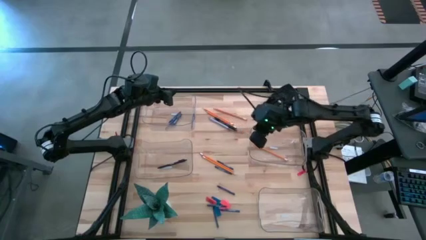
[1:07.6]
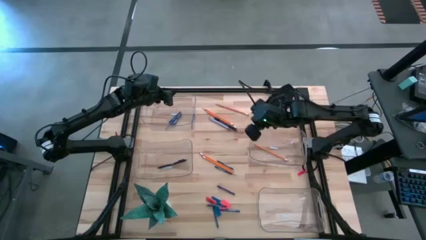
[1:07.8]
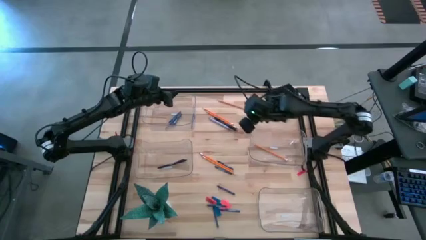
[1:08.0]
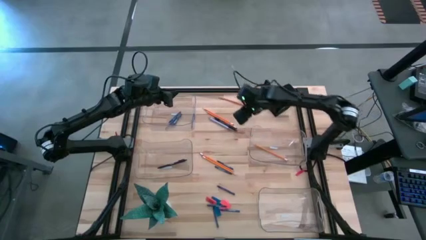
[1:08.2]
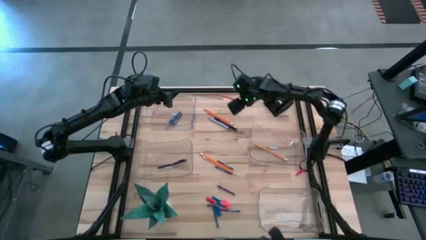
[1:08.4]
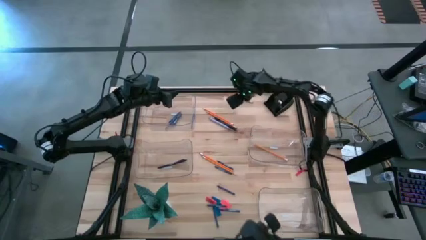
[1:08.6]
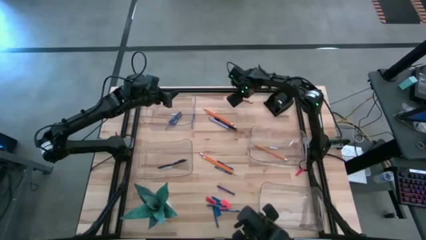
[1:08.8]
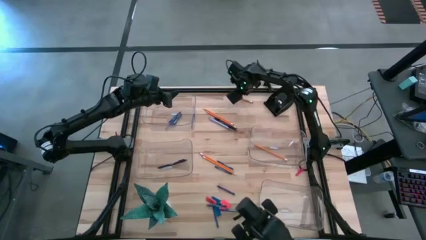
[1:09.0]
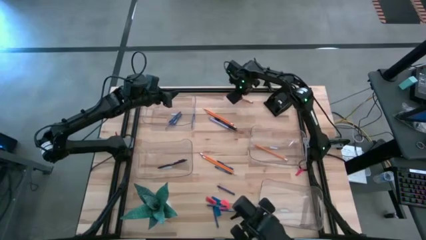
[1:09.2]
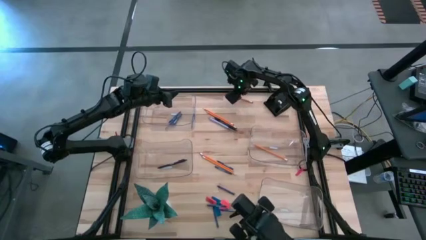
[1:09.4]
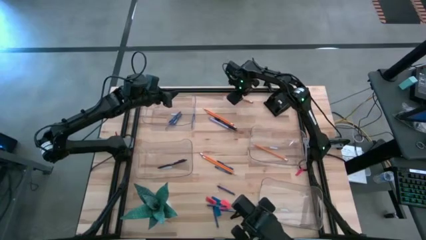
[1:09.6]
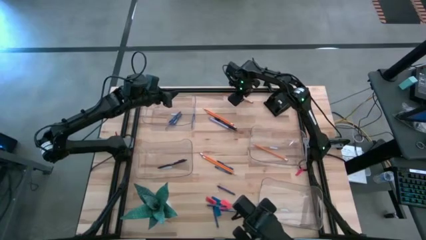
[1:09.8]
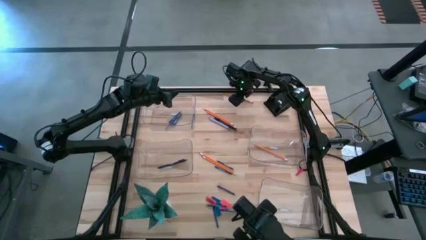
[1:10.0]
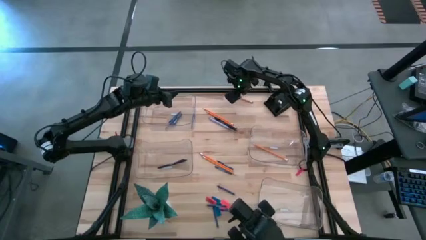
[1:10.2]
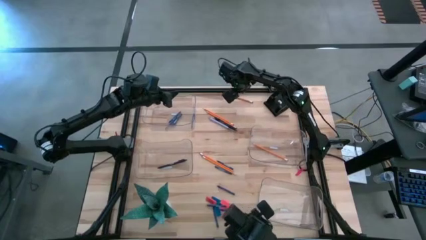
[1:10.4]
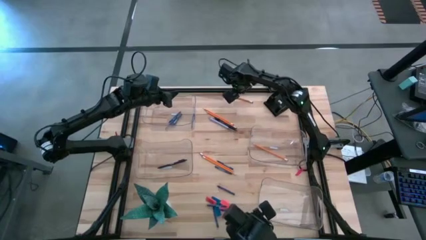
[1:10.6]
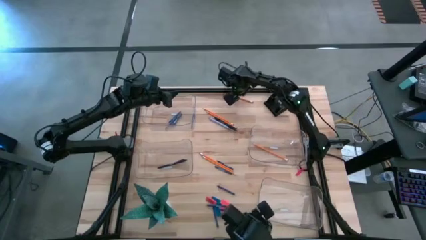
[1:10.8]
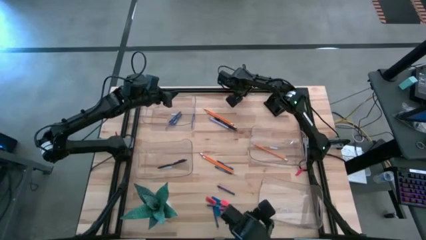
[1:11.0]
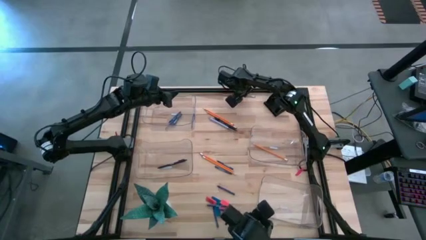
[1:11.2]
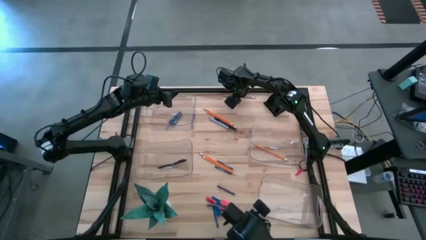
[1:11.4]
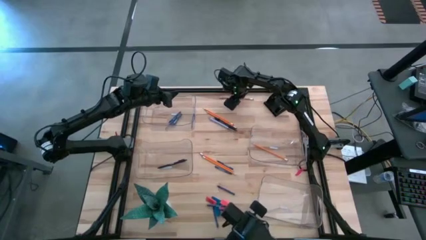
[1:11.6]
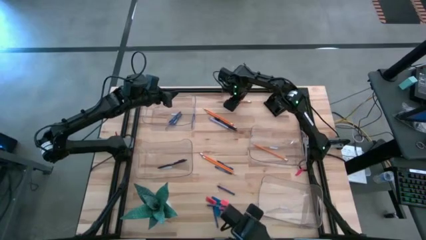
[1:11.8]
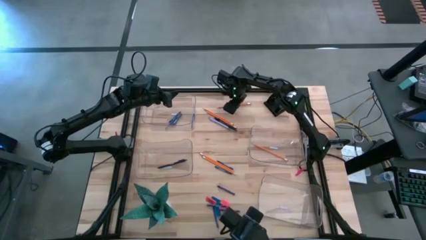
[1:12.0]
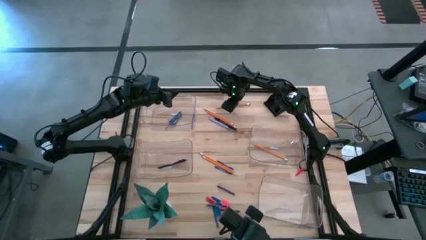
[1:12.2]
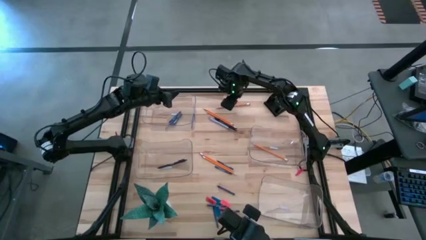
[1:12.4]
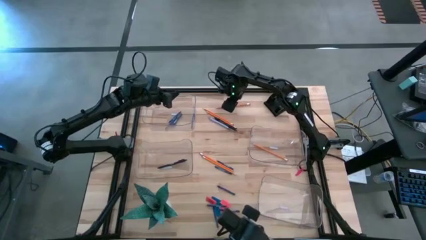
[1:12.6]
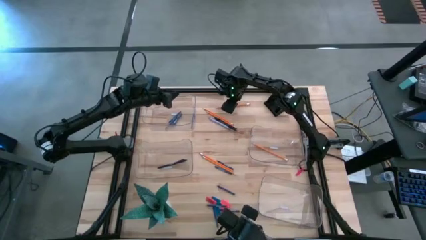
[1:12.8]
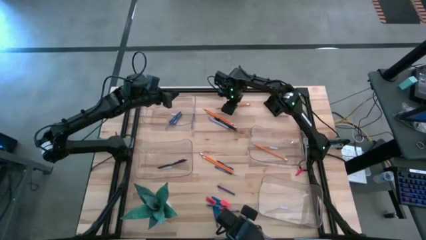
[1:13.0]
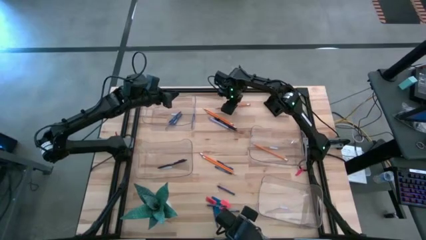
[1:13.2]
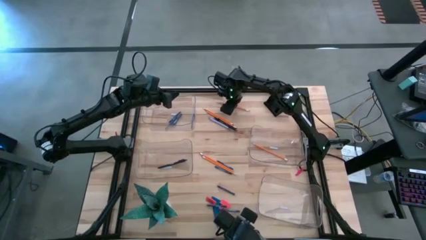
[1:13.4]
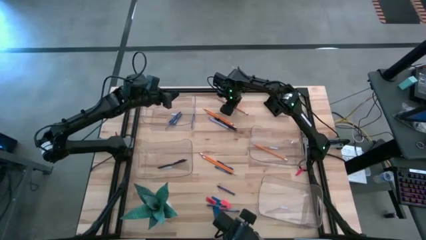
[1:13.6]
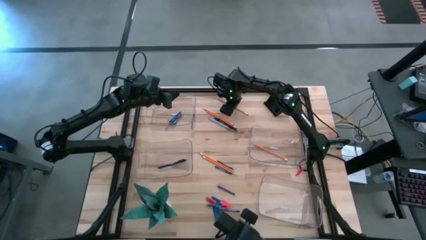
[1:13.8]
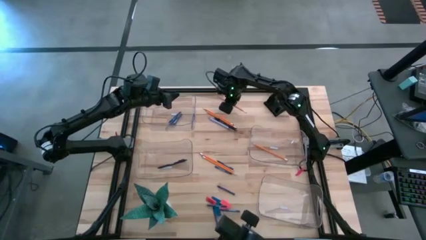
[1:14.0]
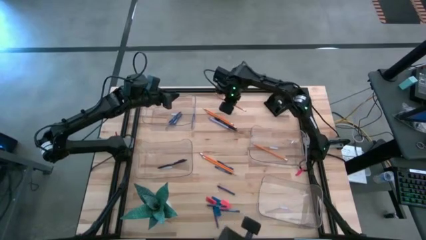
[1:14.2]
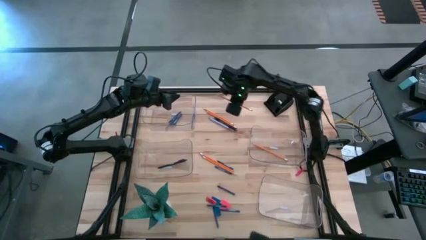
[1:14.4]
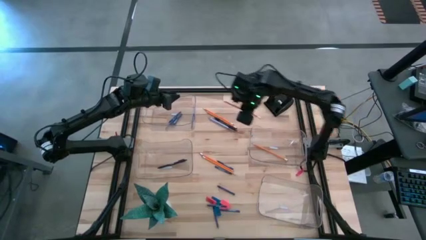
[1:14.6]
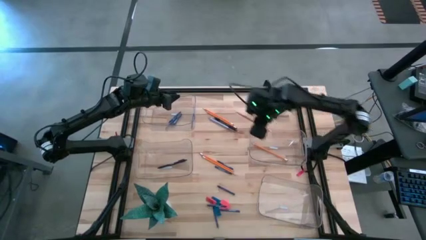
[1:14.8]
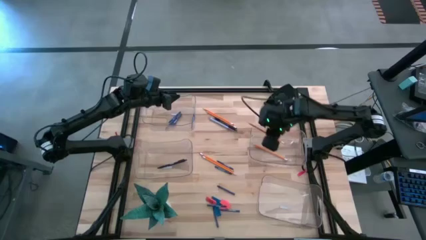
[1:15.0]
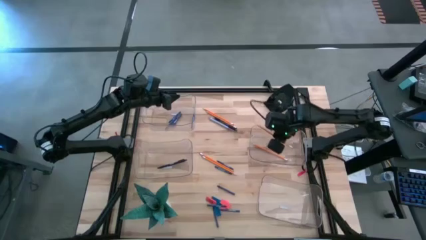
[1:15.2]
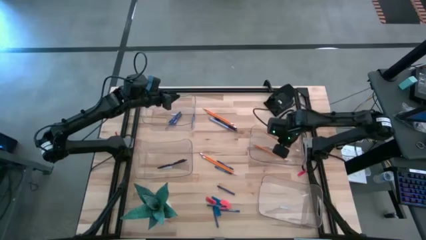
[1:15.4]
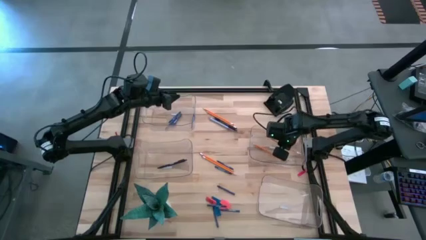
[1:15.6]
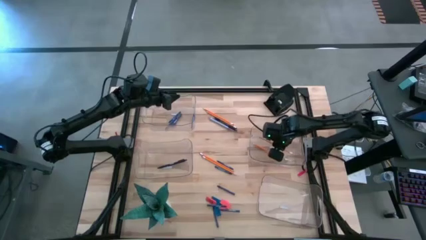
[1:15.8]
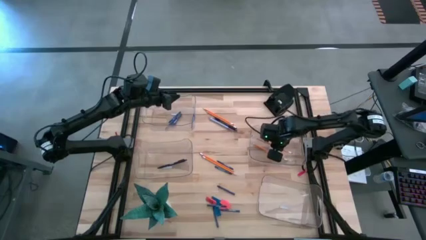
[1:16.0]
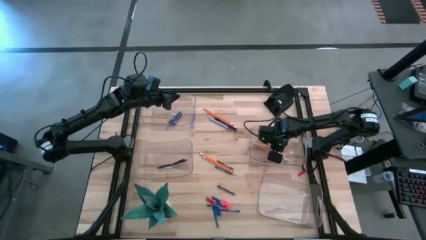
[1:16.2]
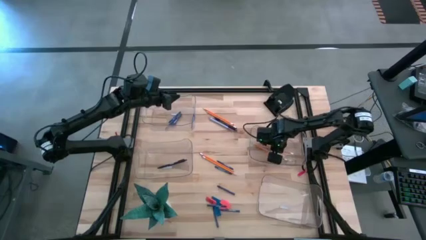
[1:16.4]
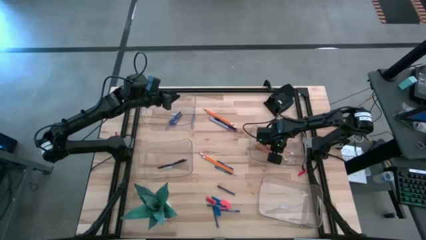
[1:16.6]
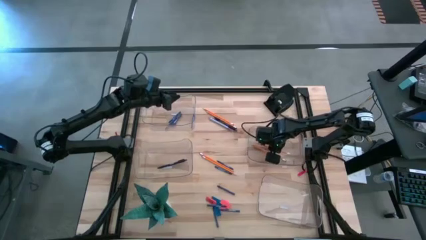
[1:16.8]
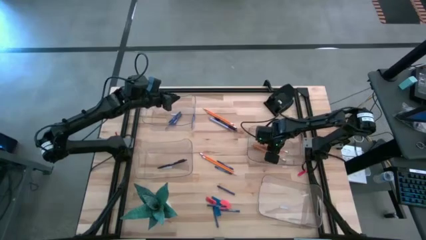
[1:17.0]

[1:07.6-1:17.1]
Task: Sort crayons/erasers/pens/pencils in bins
Put the orange pencil into the middle right transparent bin

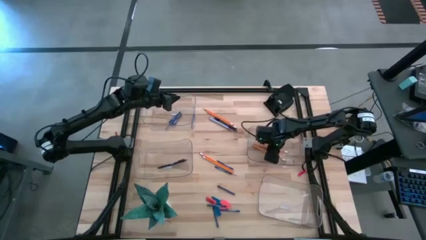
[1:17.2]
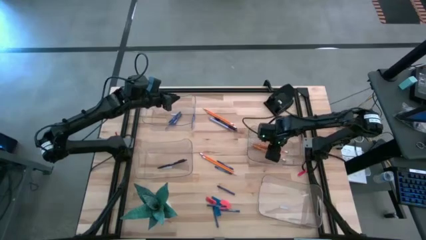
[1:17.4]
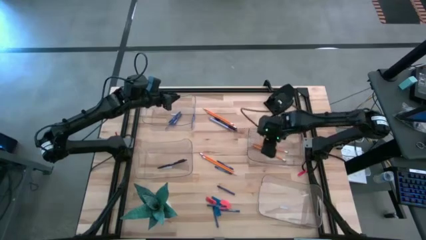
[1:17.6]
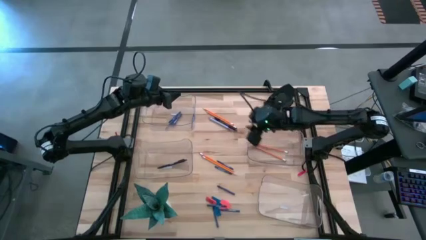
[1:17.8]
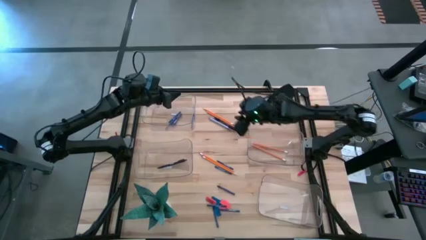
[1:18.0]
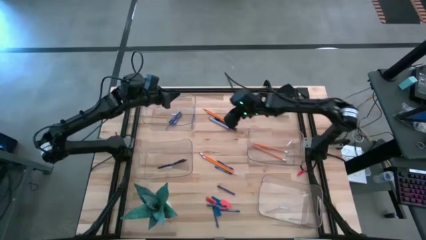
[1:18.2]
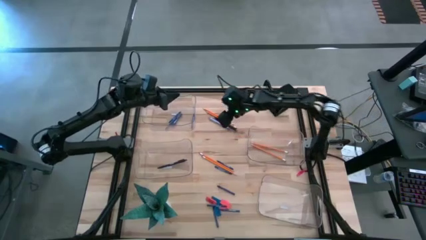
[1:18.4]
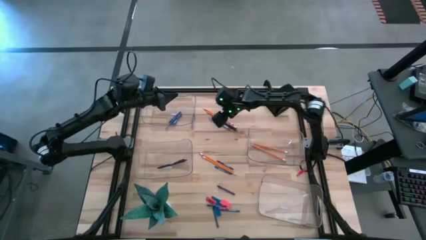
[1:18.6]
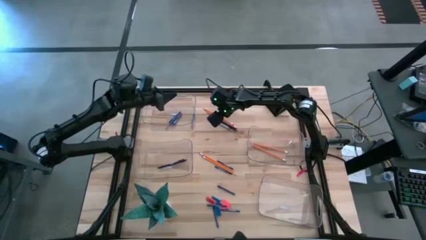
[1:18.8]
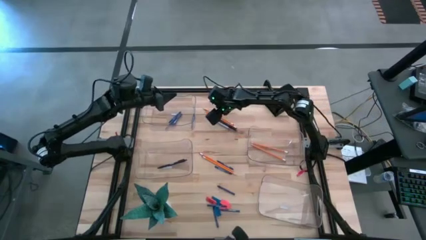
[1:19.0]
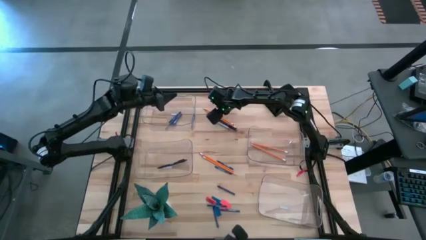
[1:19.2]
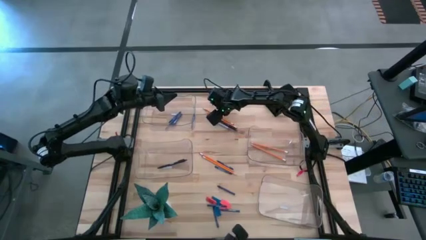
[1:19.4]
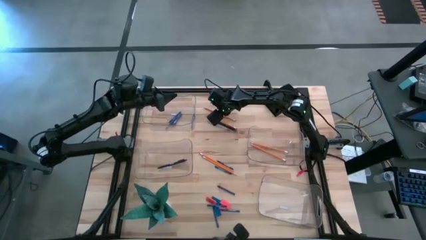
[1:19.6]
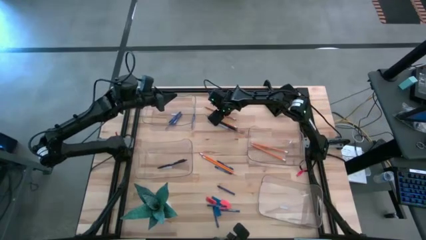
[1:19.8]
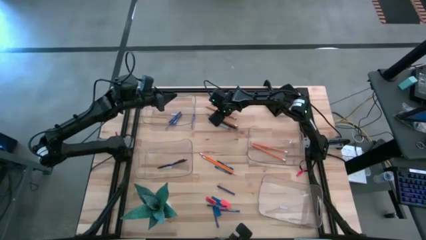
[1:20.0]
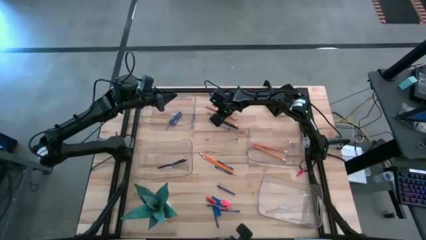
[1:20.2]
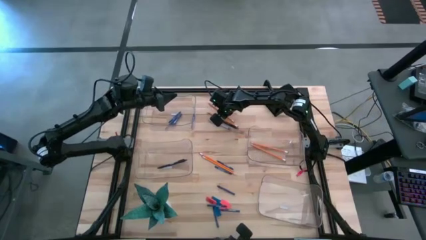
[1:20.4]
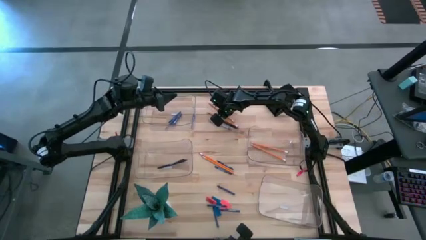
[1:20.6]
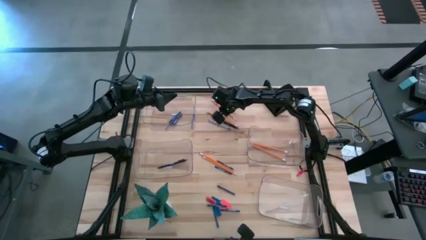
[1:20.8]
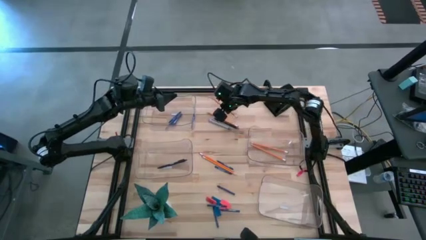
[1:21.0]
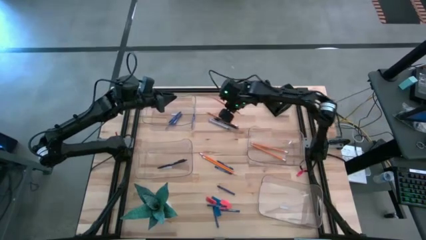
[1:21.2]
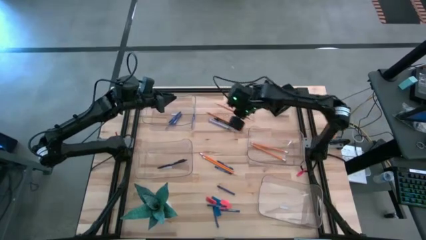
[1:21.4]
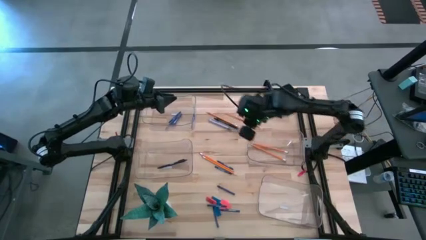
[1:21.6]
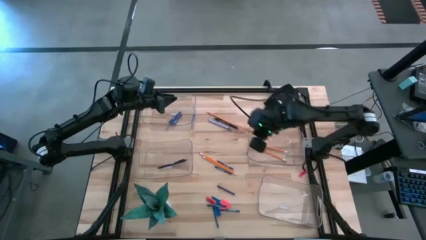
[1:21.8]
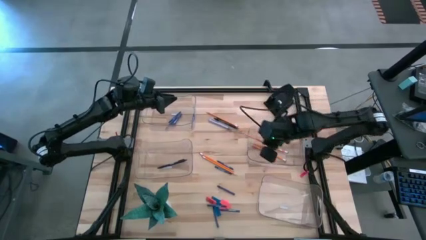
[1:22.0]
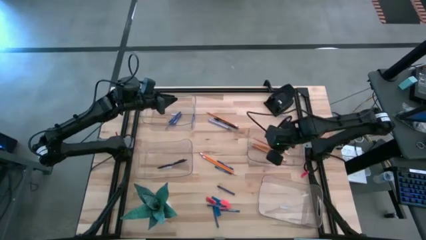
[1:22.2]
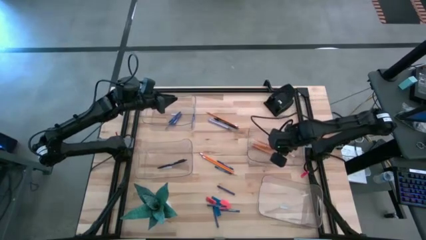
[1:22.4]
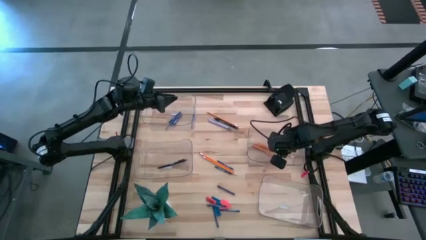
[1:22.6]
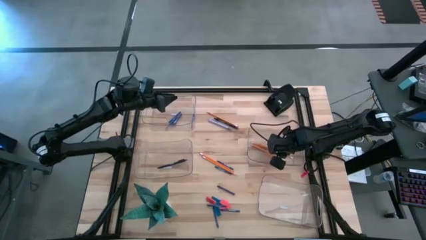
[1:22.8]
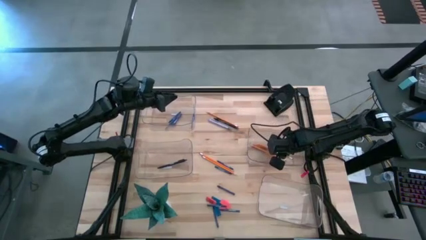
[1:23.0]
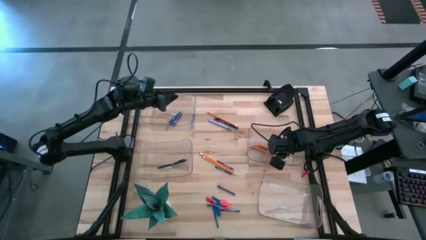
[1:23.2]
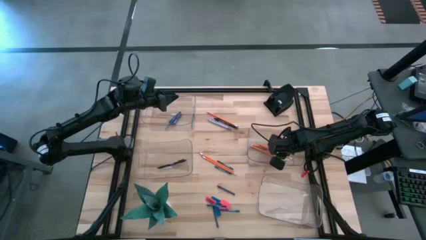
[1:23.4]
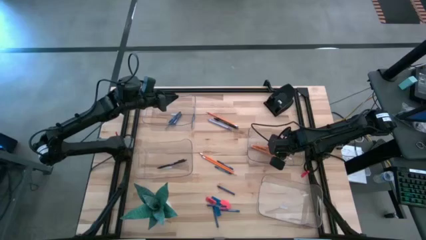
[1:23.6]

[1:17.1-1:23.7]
Put the orange pencil into the middle right transparent bin

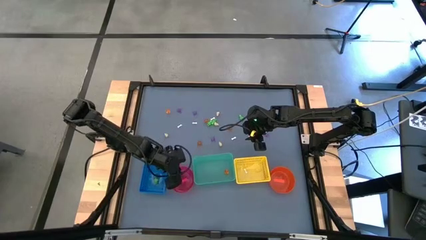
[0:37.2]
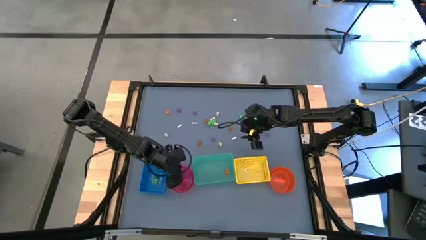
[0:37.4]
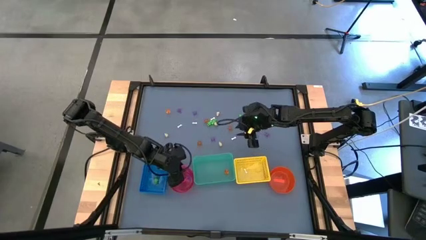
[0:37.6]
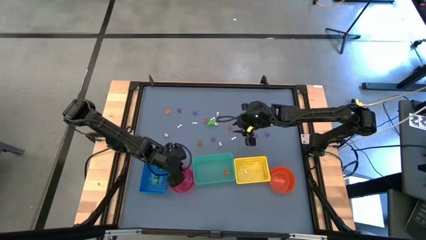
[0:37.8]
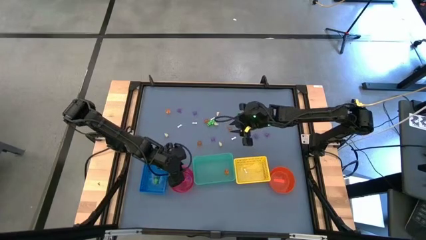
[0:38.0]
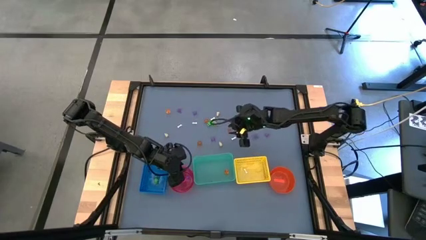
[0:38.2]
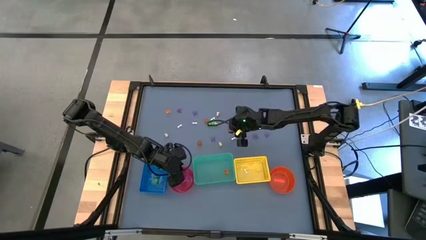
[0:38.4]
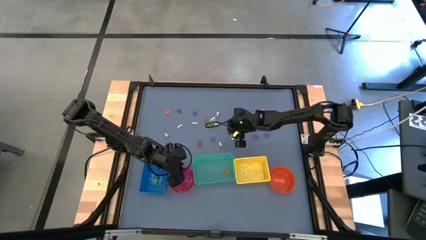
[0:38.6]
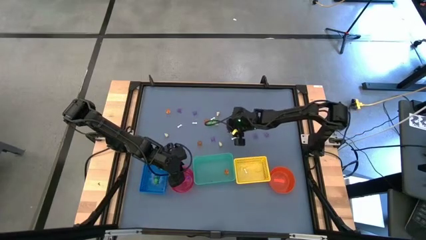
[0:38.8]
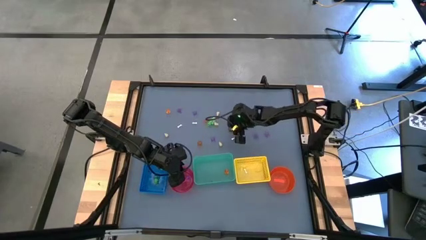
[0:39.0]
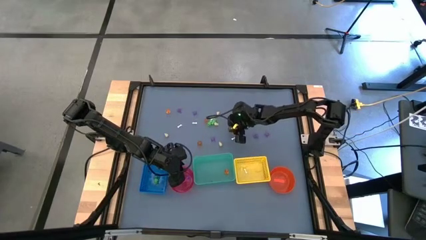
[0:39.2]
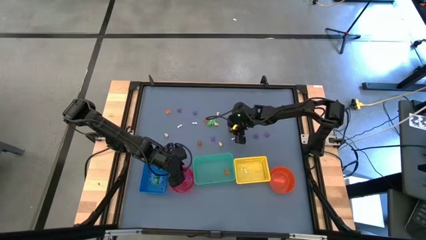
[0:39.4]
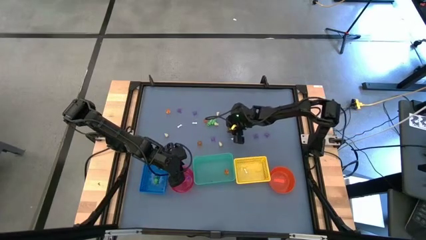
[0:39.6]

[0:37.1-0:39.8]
Task: Sort Halloween decoration
Put the orange pumpkin toy into the green bin
